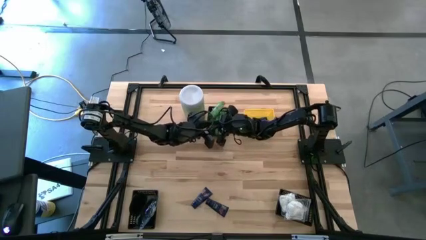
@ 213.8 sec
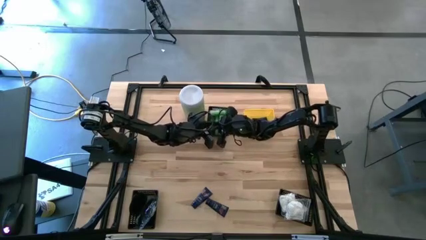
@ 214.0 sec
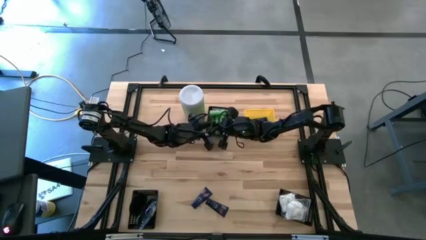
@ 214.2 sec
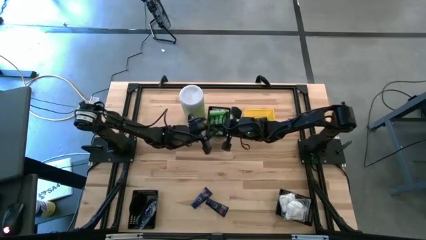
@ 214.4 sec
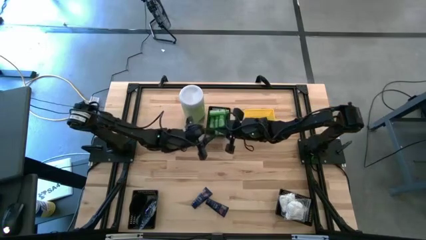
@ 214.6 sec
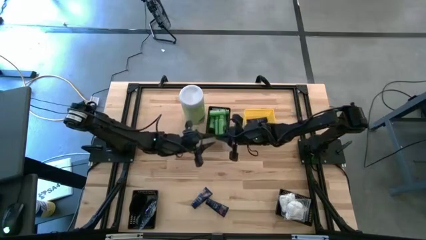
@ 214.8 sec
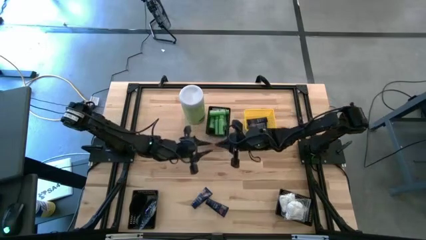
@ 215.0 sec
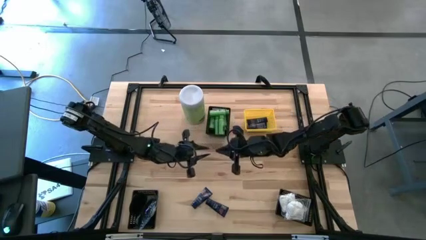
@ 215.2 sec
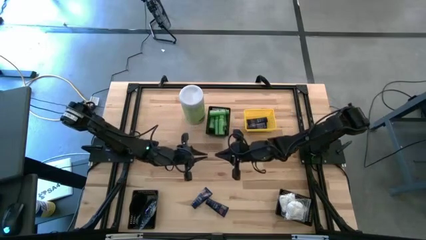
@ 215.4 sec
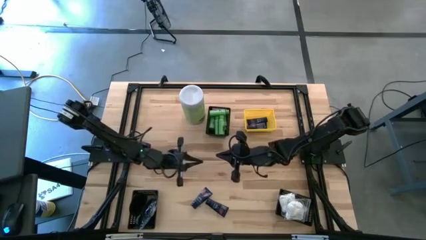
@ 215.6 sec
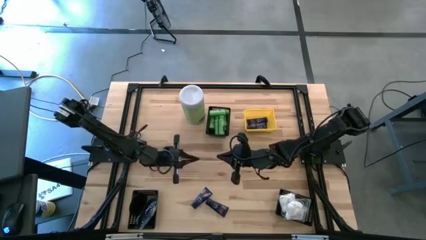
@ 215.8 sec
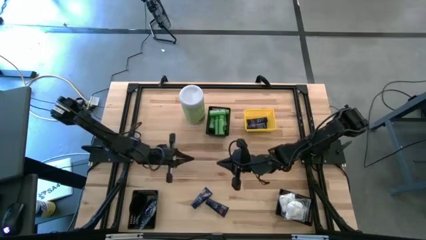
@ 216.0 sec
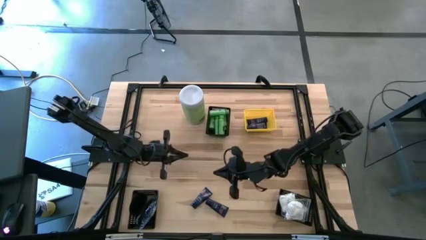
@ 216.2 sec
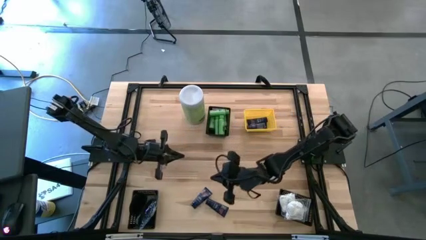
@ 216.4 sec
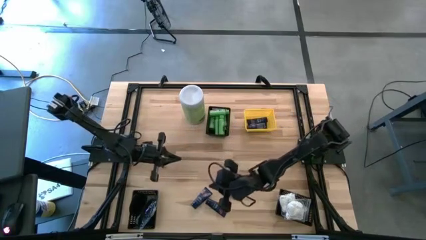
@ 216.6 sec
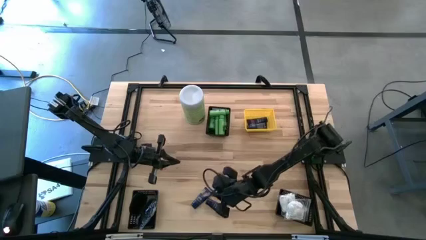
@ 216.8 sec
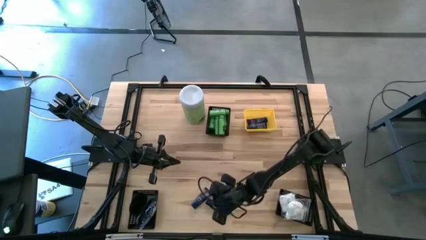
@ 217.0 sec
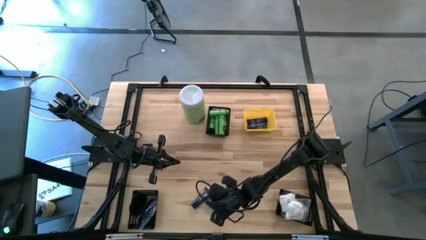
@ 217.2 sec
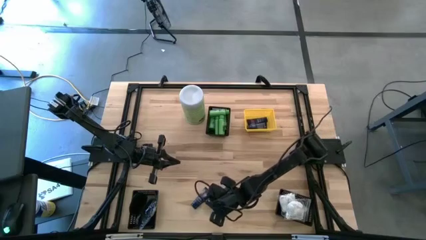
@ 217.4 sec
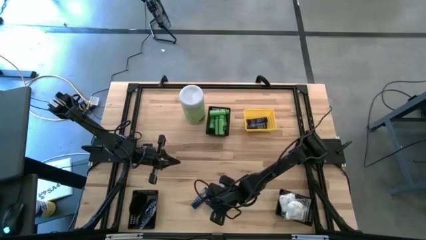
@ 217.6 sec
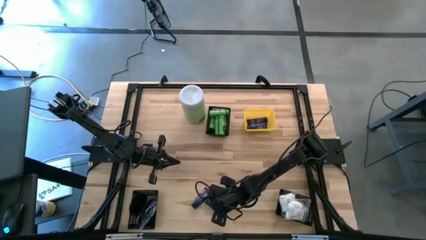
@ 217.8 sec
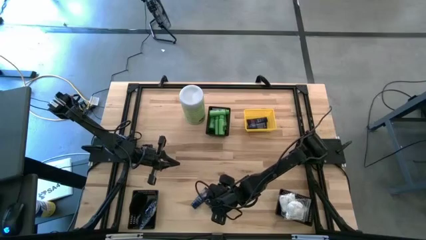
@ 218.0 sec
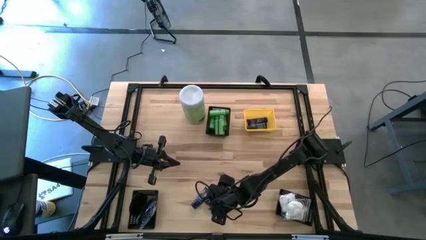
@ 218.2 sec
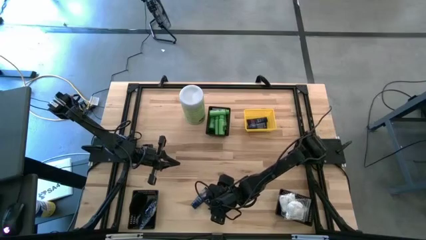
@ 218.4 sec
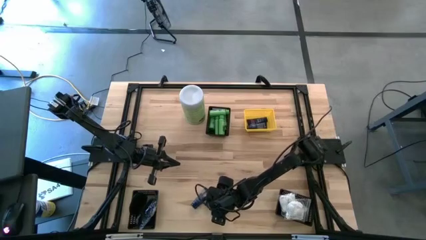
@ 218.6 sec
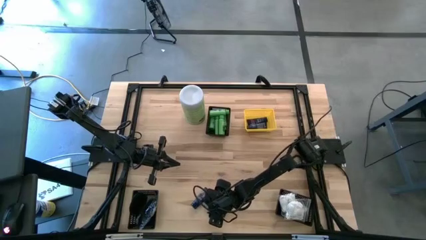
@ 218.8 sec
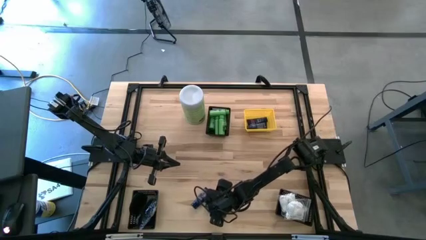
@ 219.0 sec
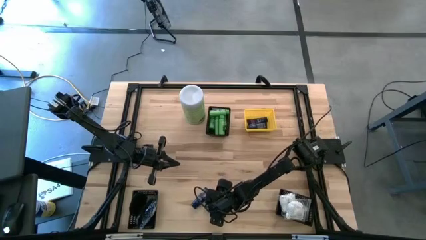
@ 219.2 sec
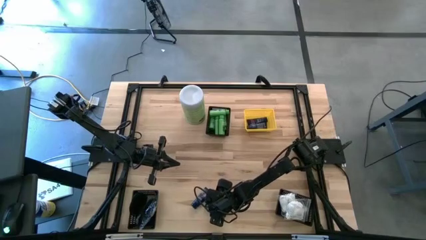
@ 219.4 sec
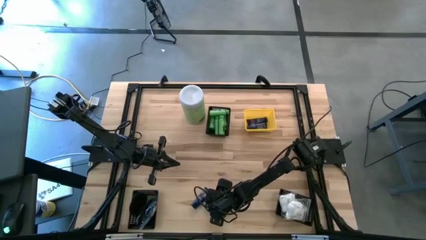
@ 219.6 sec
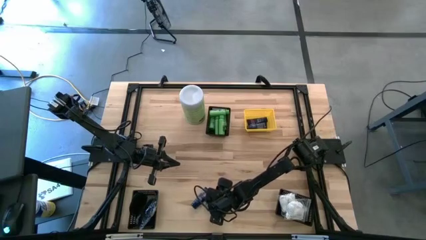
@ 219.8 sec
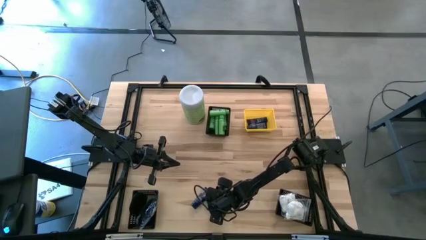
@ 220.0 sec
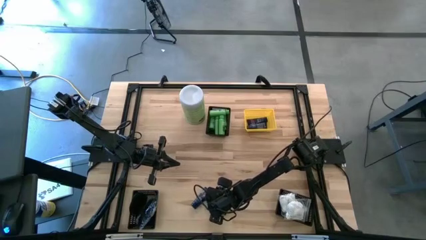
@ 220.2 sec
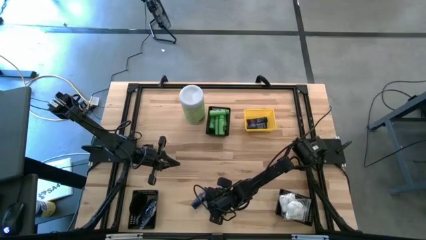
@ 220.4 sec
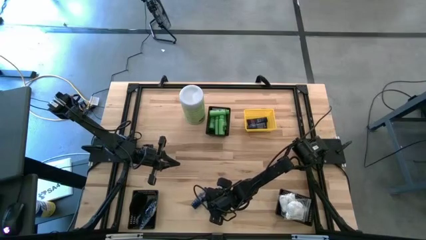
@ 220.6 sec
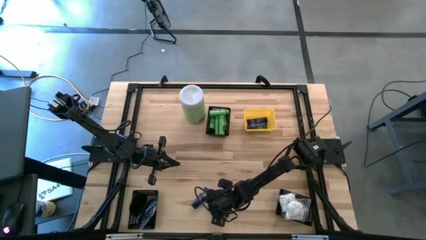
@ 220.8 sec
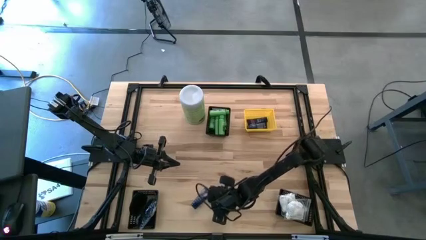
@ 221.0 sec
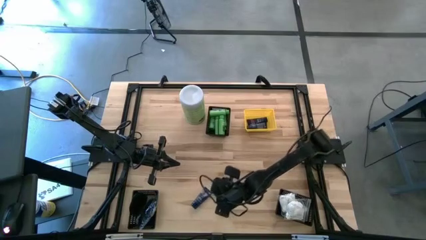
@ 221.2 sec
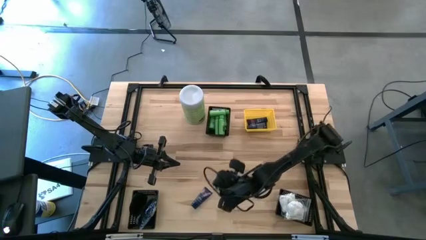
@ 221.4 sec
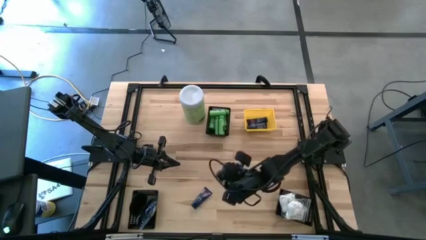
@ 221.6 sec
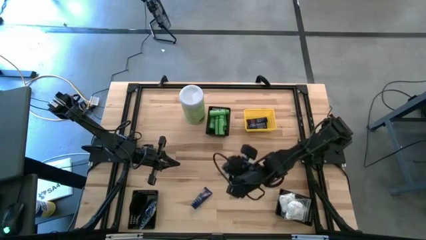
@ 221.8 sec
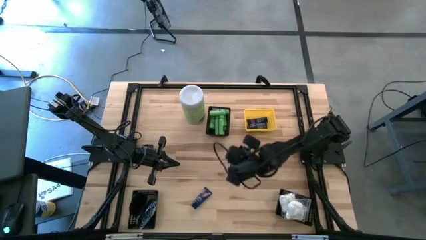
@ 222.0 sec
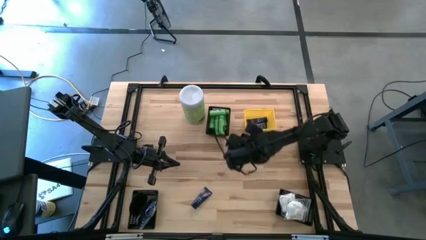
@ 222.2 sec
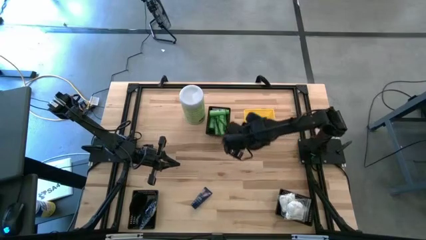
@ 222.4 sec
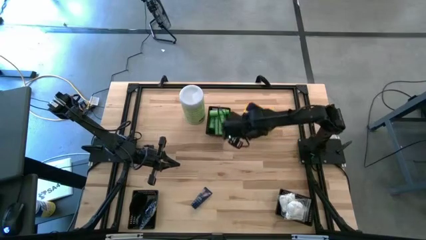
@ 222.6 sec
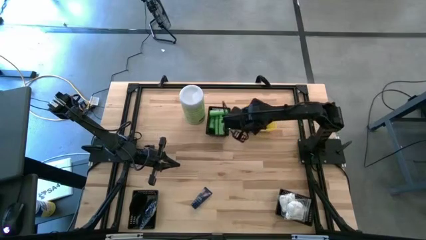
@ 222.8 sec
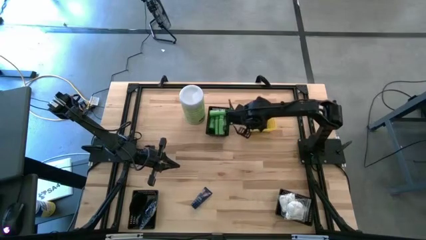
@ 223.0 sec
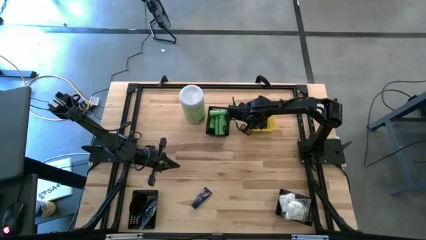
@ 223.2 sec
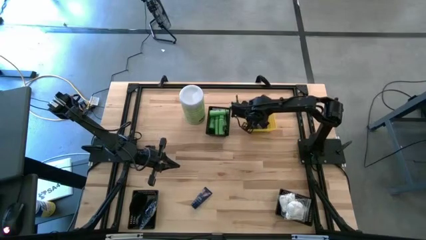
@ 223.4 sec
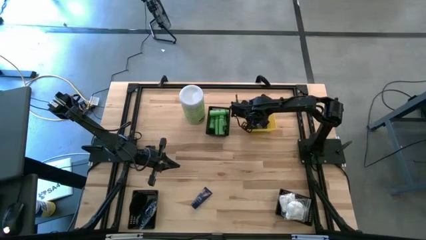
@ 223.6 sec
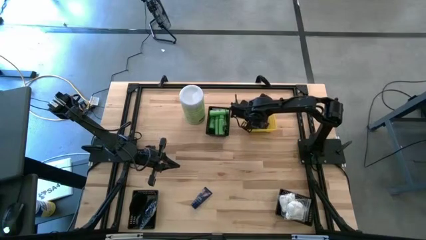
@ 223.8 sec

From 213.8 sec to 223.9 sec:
Task: Pick & Place Travel size toiletries
Put the blue shave butter into the yellow bin
